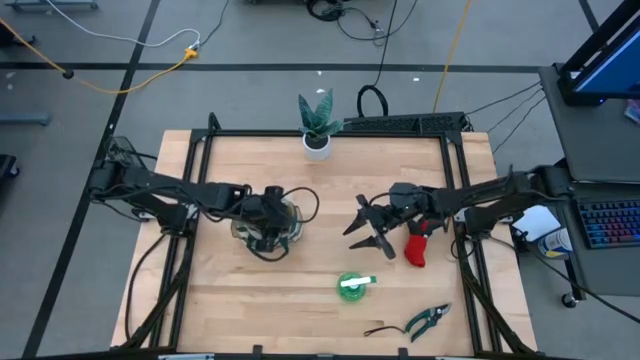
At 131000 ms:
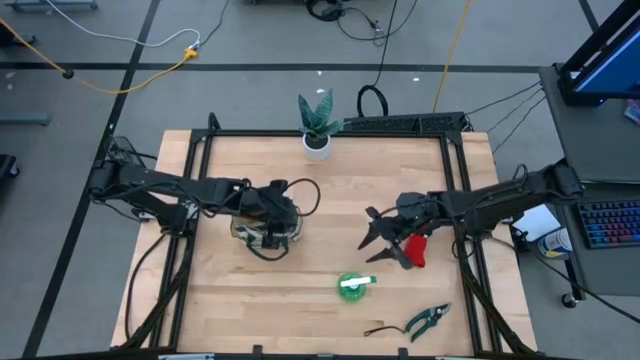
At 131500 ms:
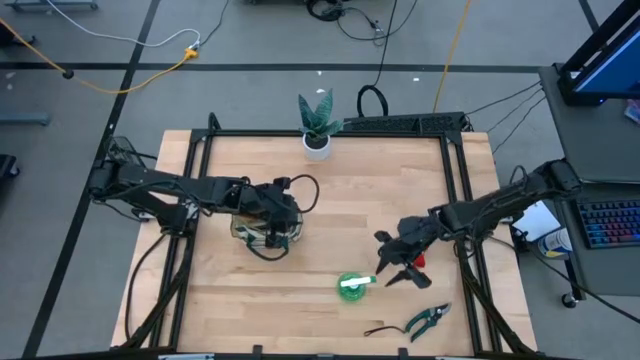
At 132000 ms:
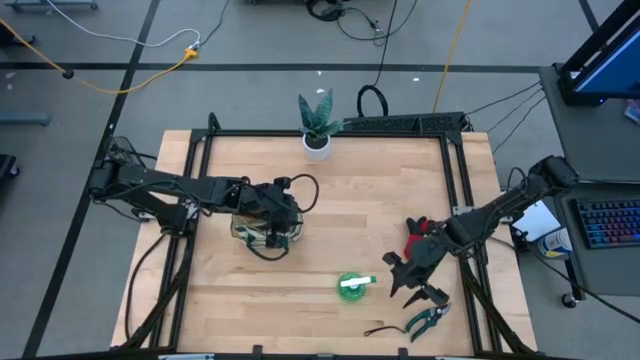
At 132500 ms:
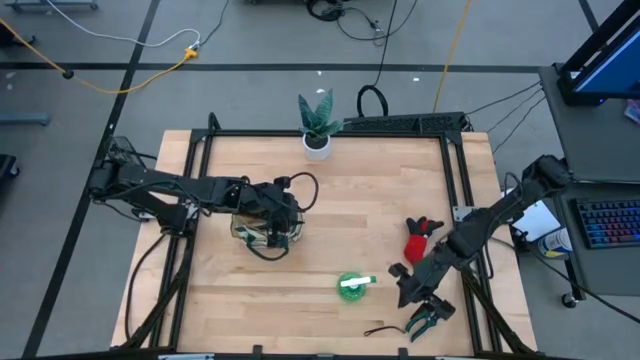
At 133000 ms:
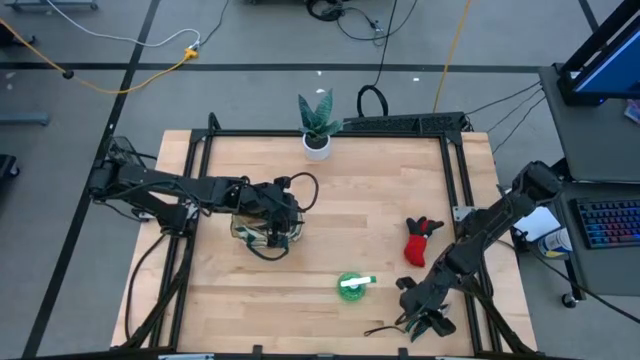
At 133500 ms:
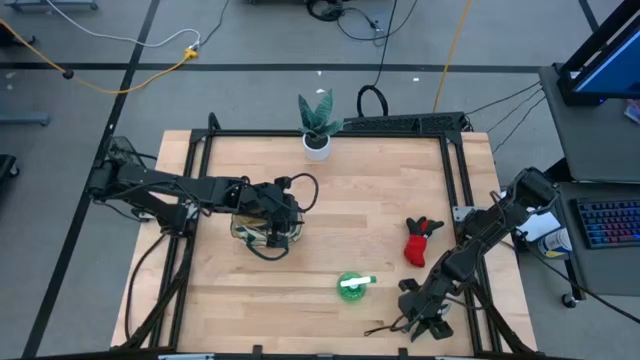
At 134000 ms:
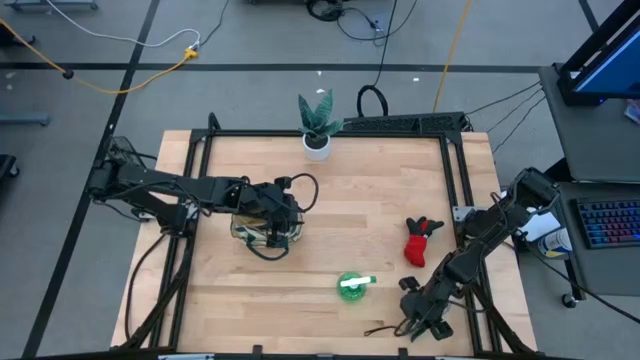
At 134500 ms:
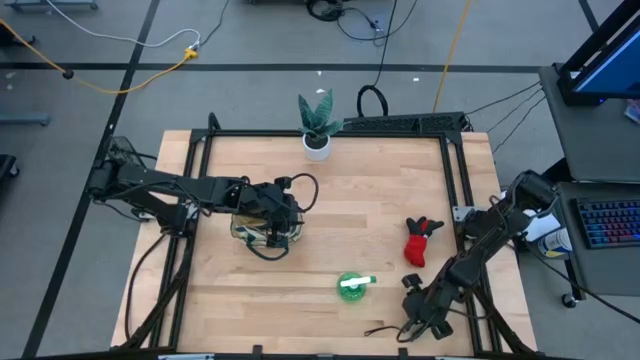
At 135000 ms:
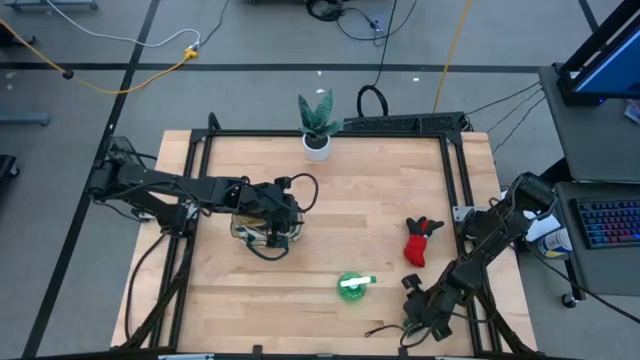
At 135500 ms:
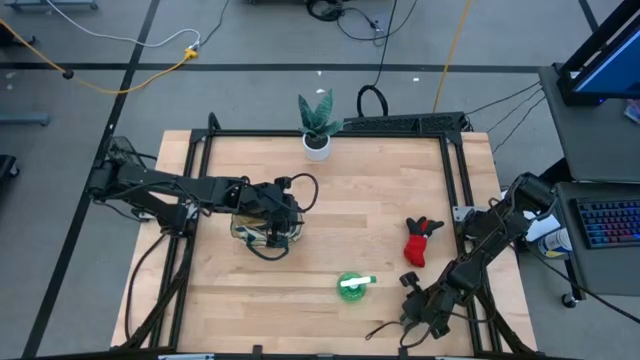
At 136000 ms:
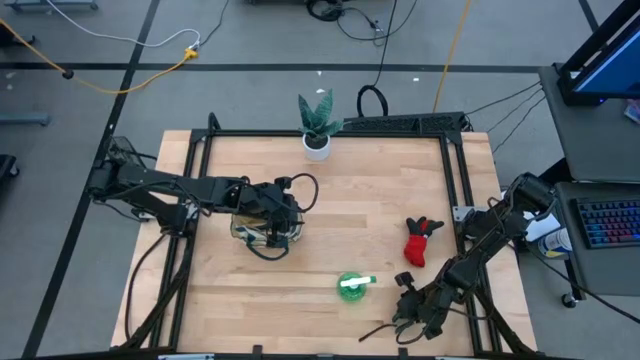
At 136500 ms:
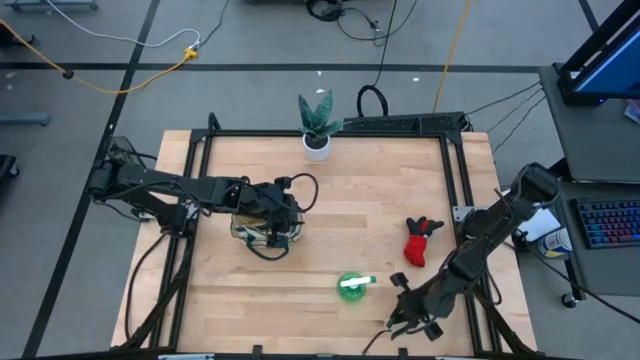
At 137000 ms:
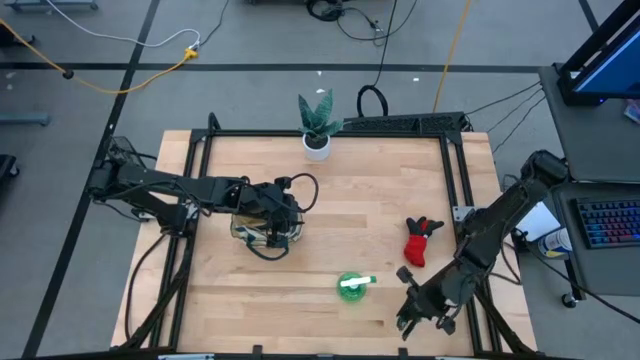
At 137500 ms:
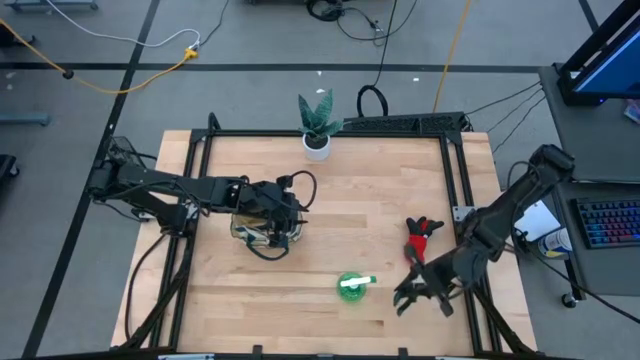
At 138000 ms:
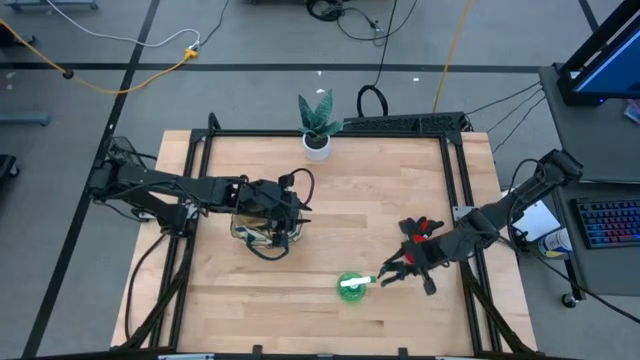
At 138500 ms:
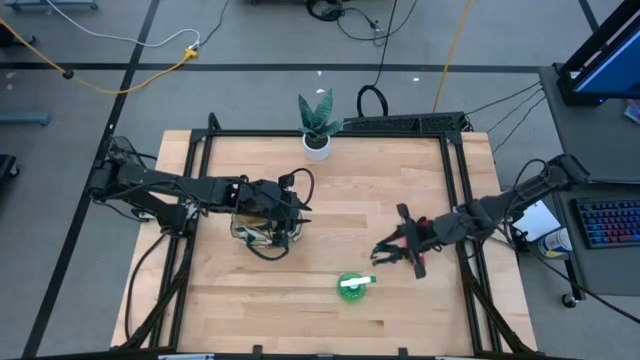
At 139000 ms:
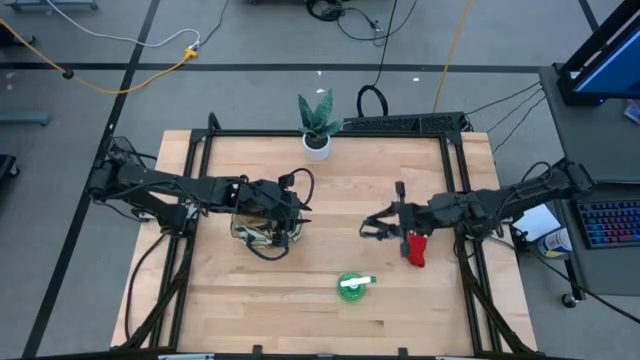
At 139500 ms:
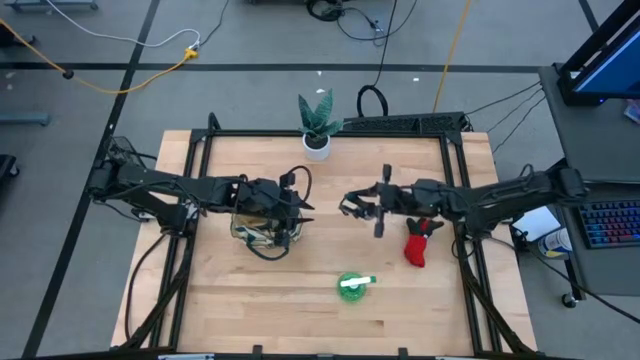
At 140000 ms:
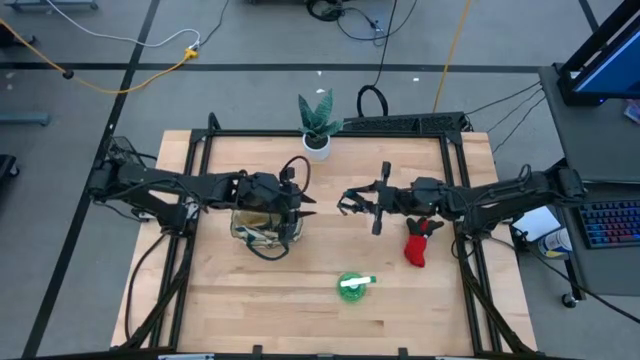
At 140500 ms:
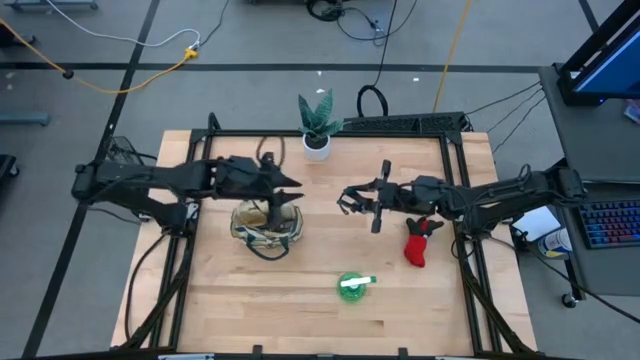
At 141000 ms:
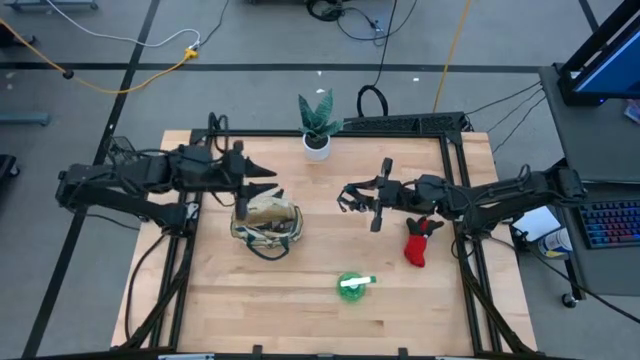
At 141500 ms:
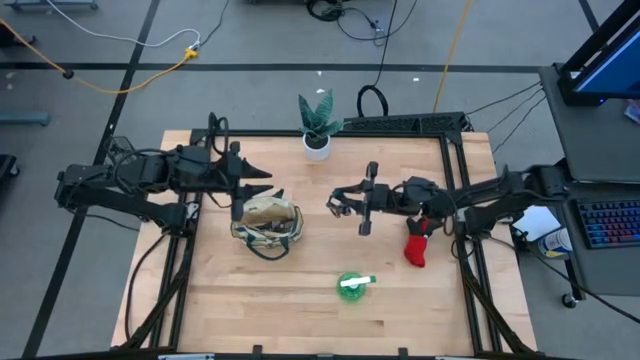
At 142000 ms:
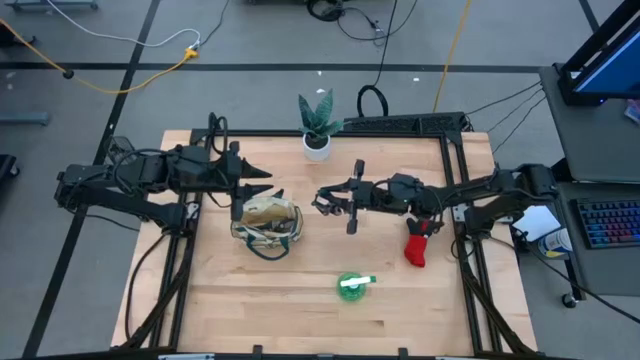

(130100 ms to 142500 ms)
Task: Pick & Place Garden tools in Gardening bag
Put the green shear scissors into the white gardening bag

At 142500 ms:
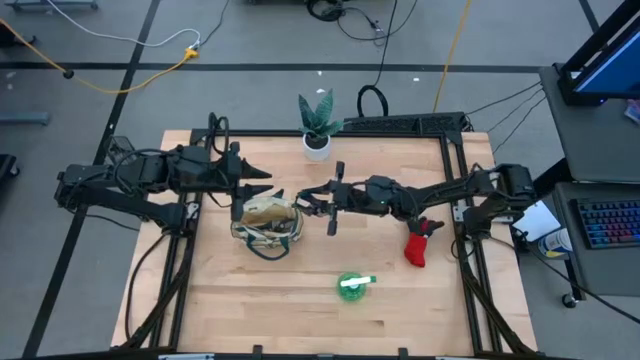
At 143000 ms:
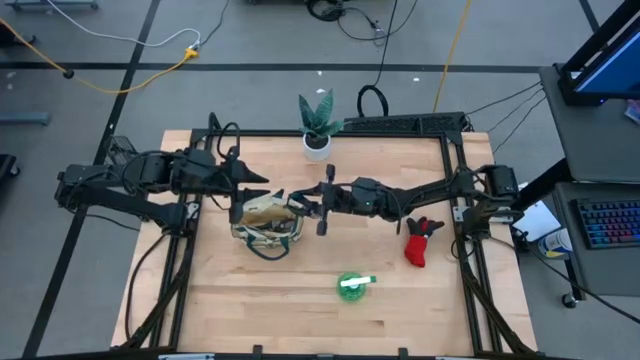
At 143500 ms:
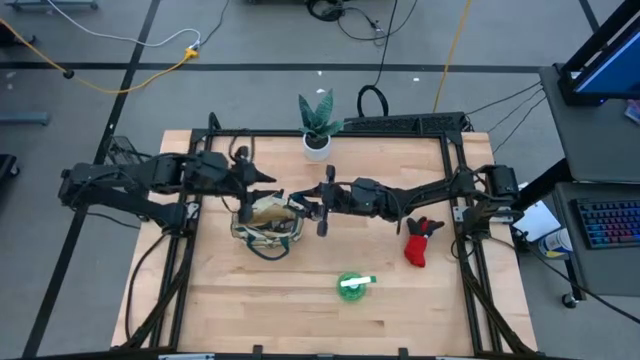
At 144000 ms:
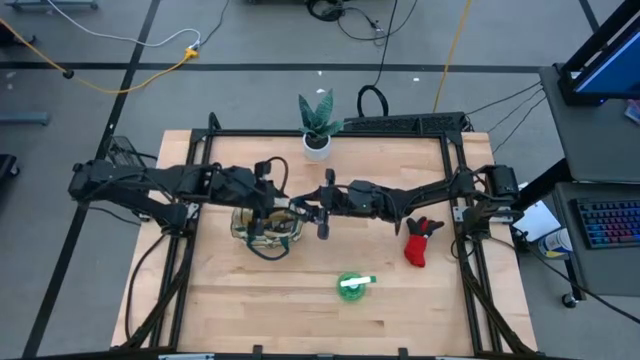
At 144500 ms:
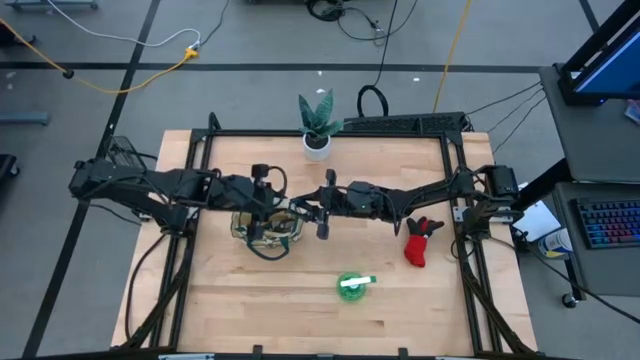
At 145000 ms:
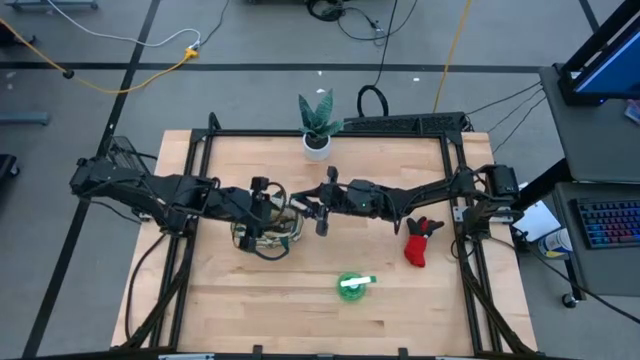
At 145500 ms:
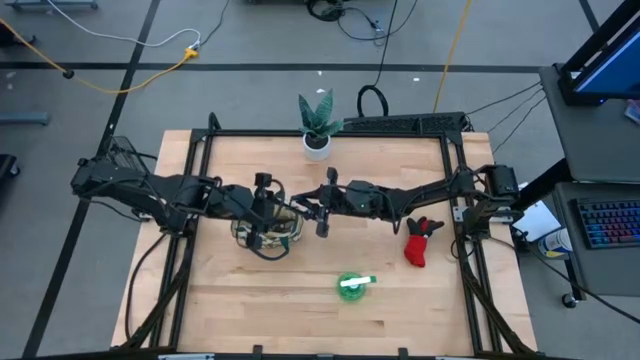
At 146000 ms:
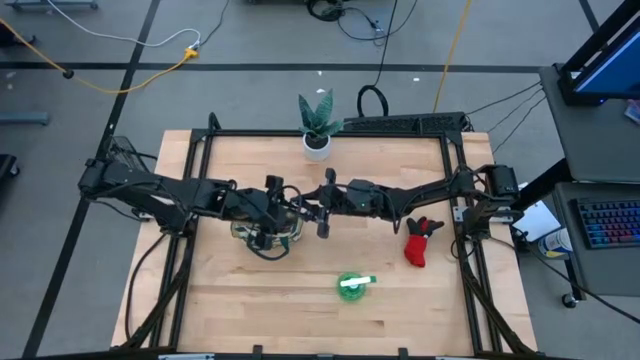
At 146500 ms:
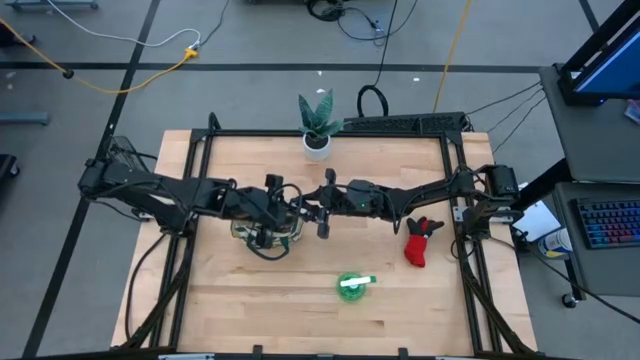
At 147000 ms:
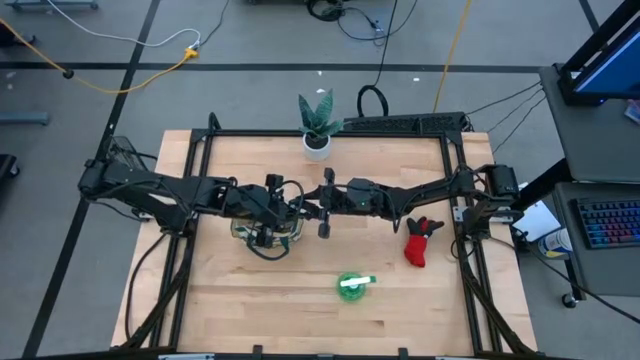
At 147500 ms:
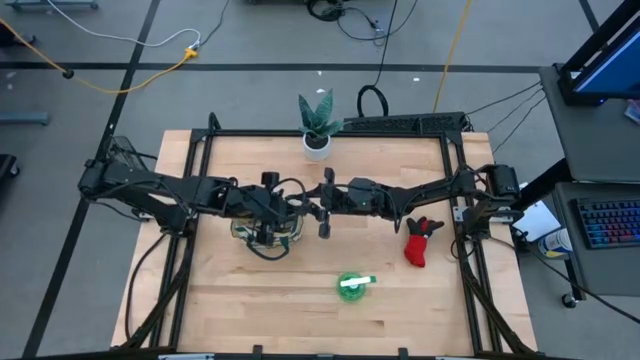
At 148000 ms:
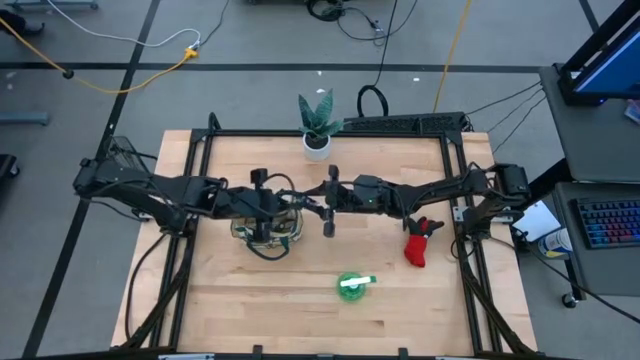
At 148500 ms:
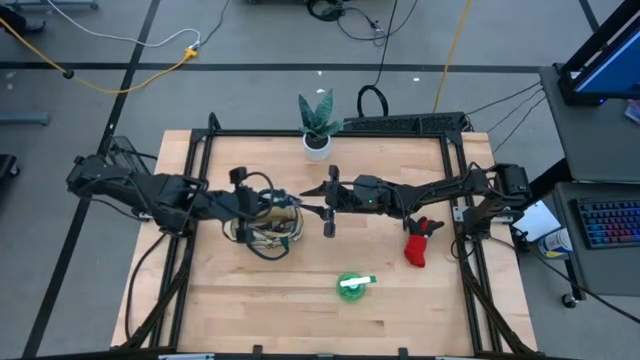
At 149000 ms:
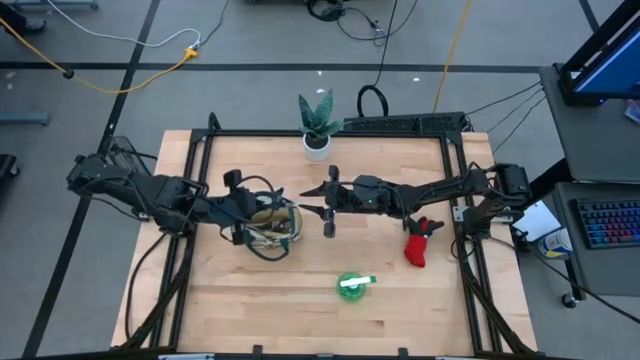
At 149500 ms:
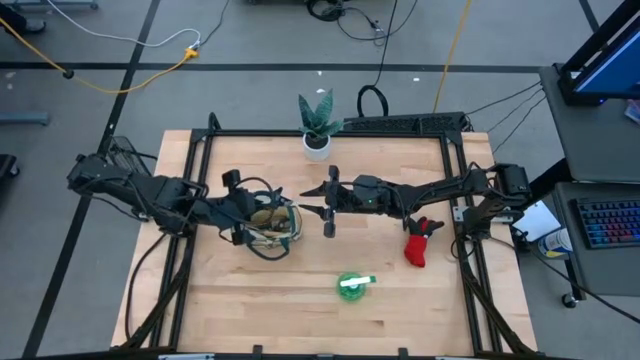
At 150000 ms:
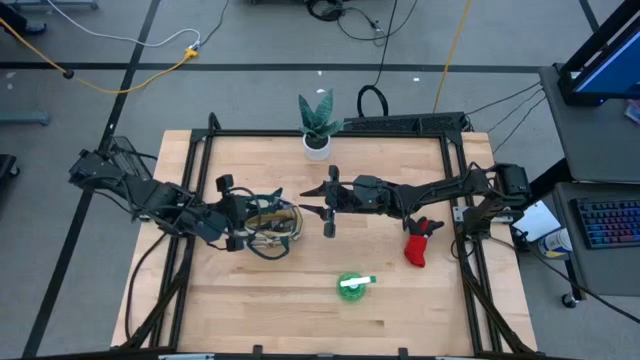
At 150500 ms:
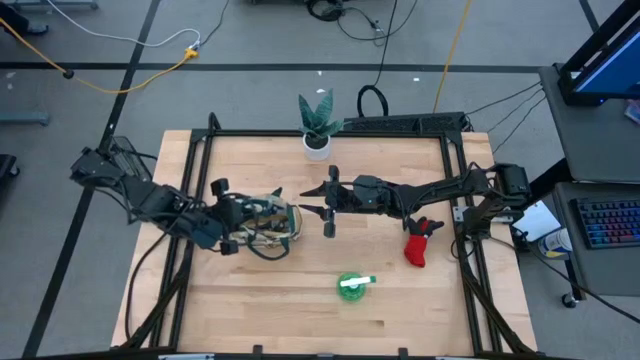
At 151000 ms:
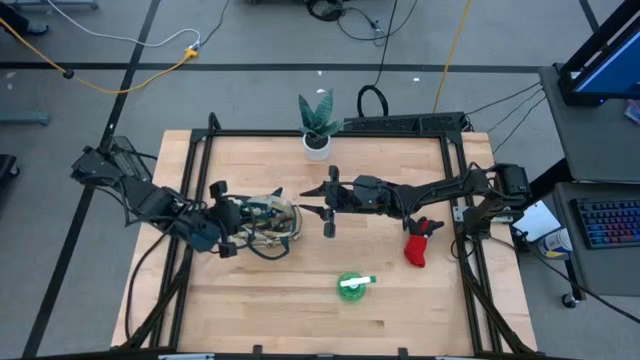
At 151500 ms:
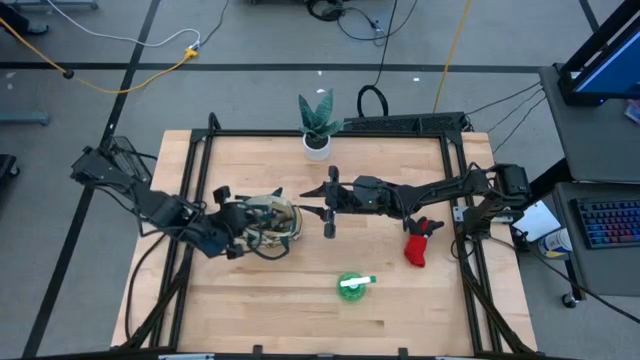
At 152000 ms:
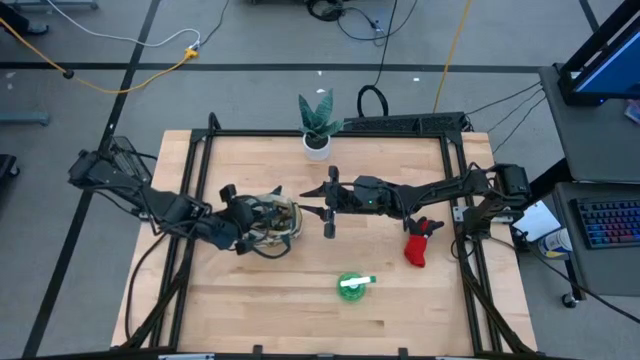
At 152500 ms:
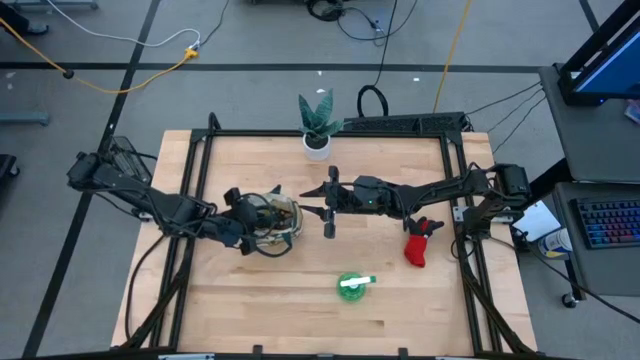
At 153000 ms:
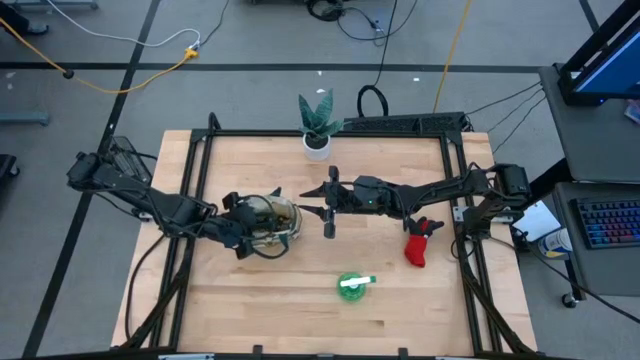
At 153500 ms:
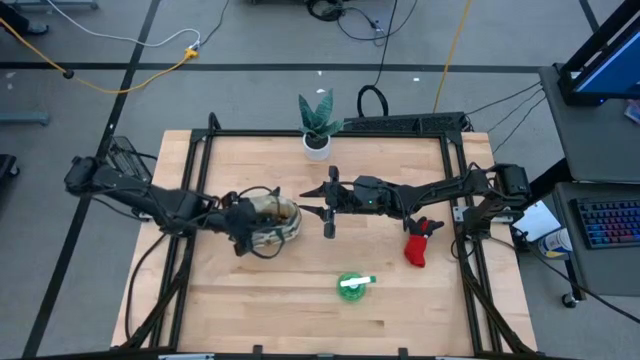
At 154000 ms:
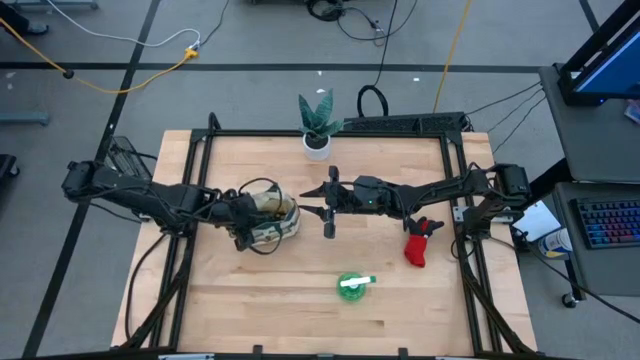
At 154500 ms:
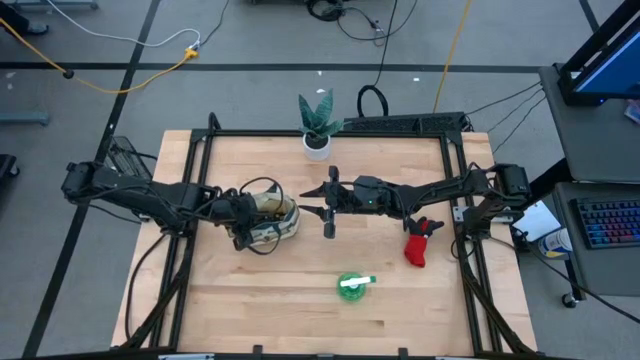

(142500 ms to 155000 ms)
Put the green shear scissors into the white gardening bag
